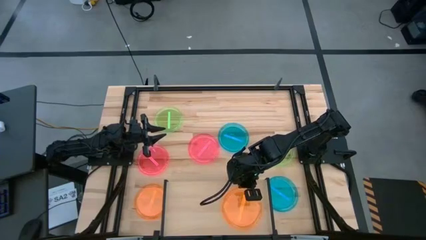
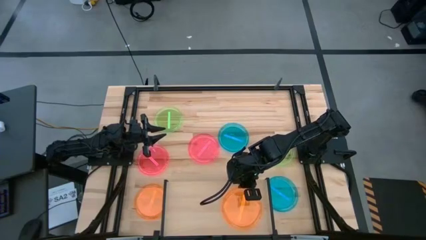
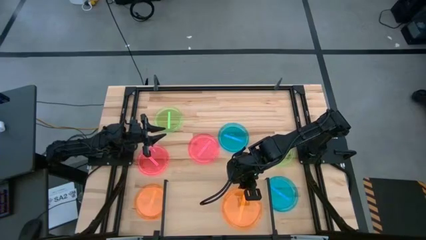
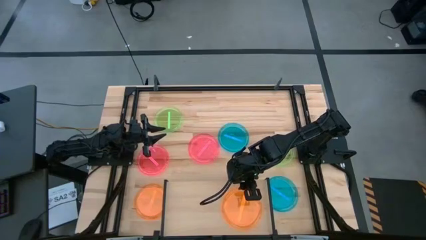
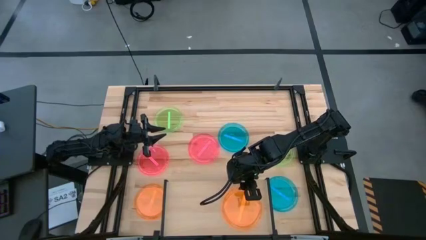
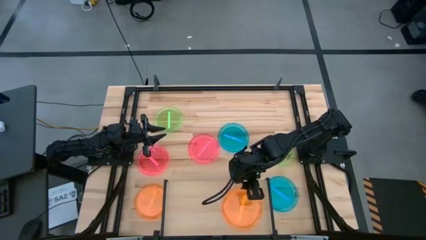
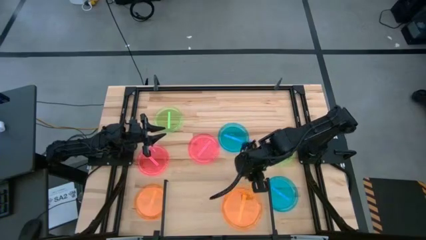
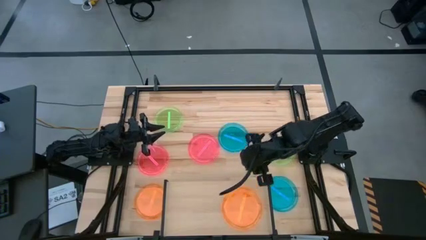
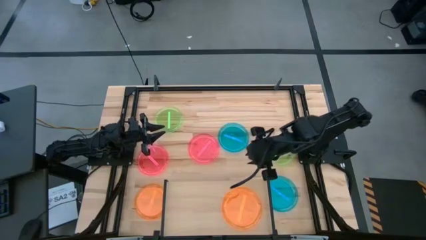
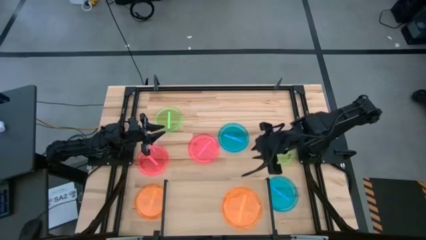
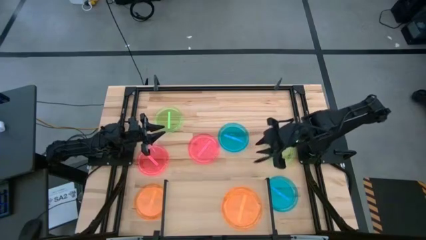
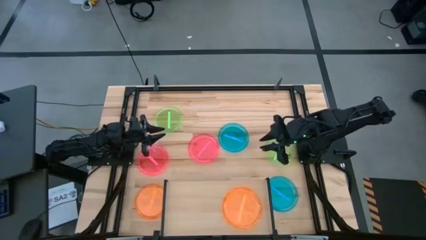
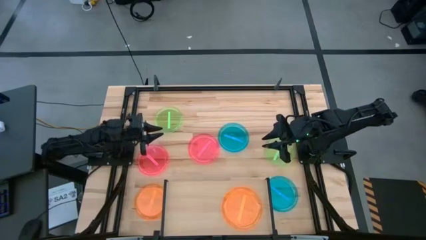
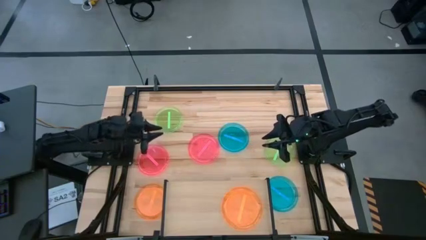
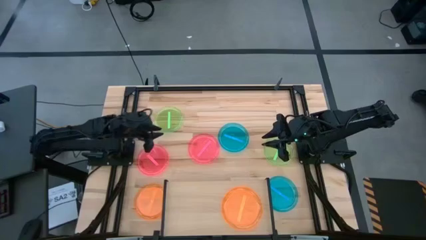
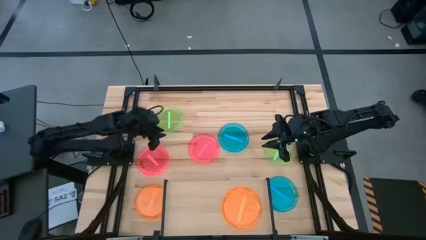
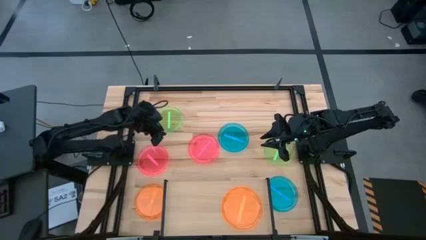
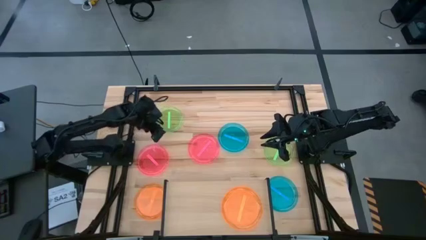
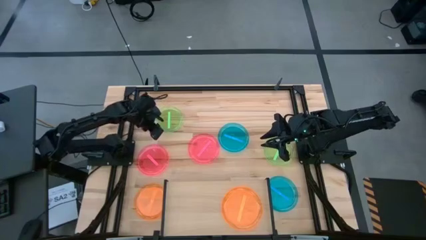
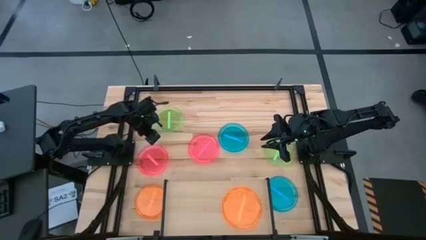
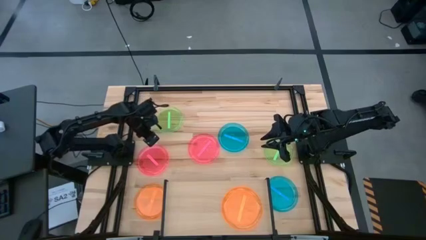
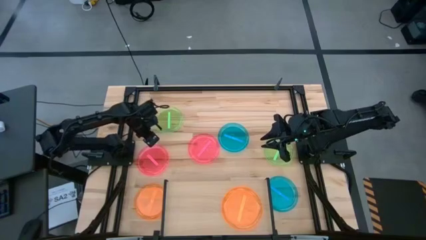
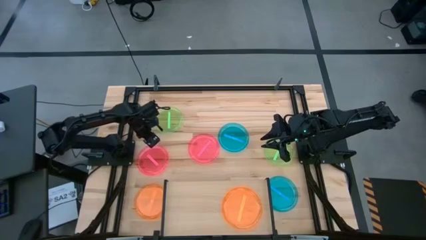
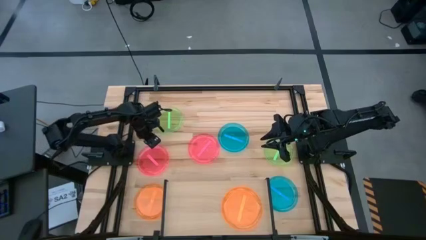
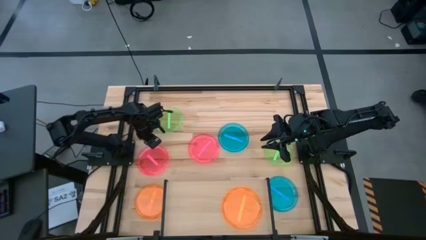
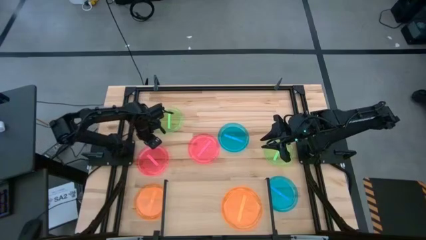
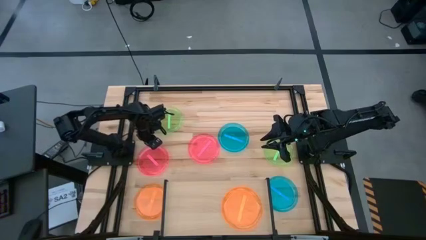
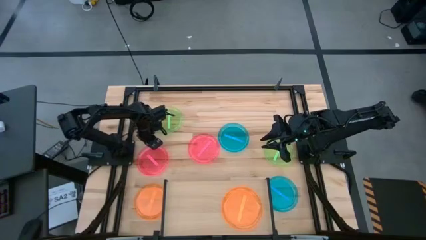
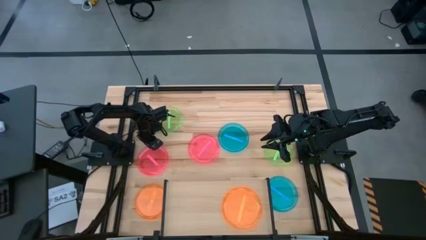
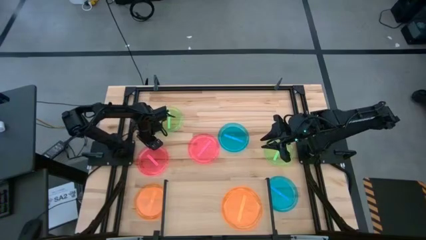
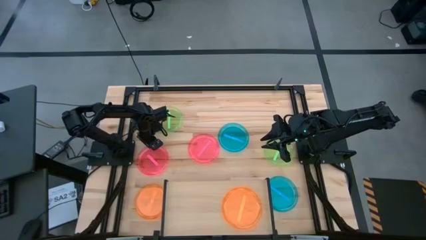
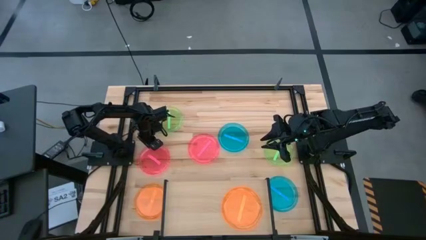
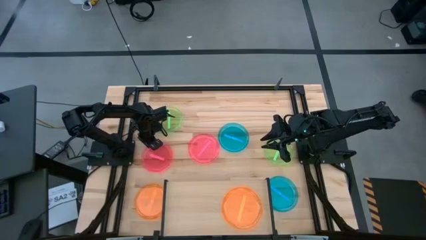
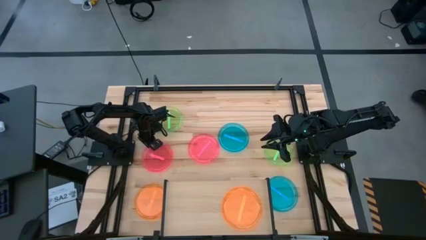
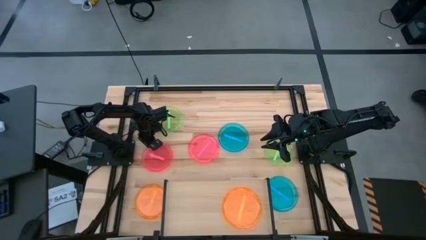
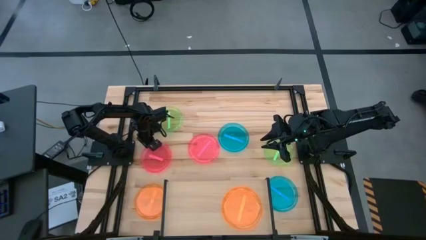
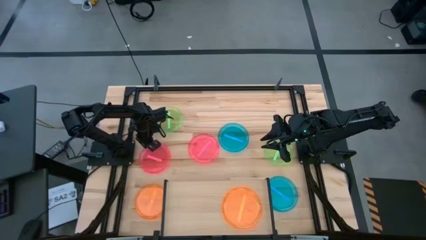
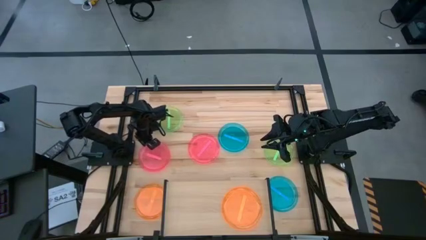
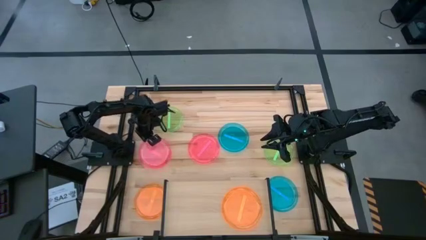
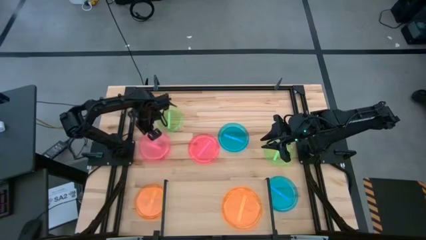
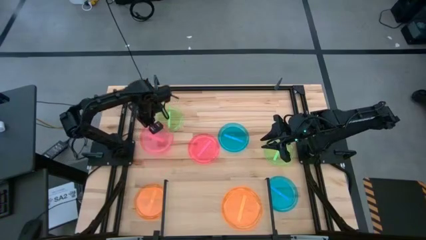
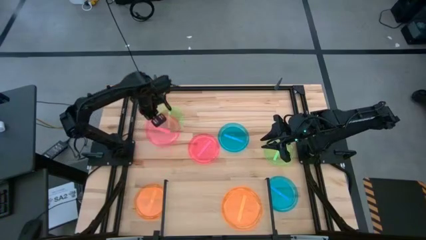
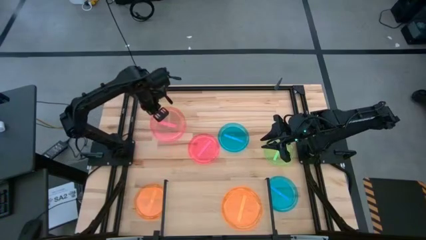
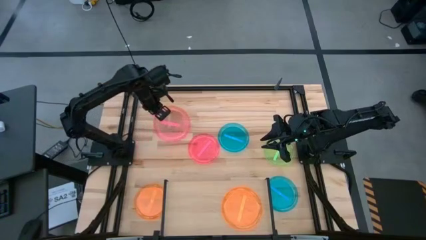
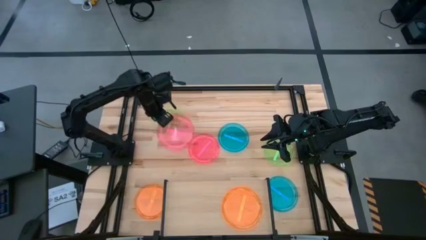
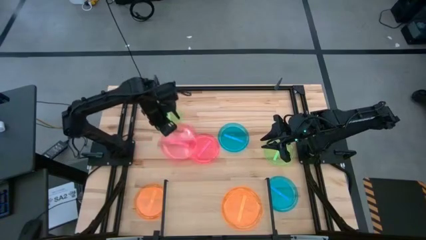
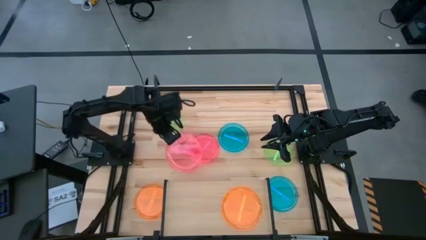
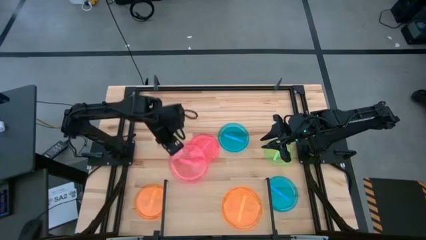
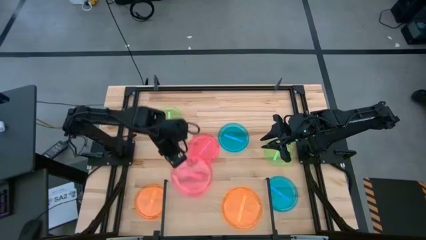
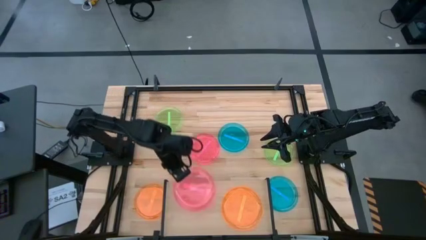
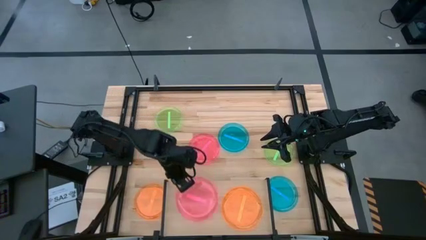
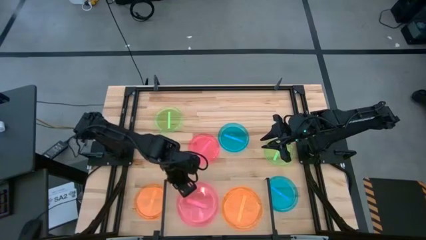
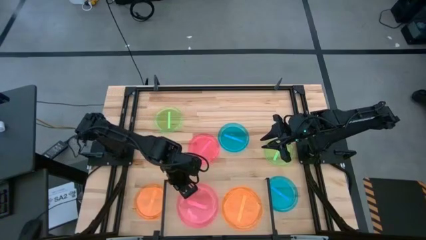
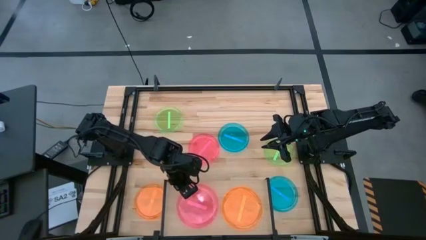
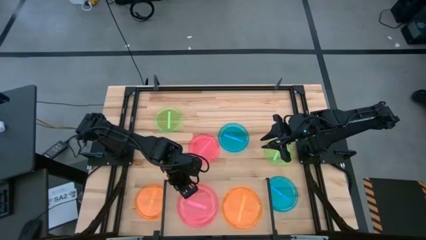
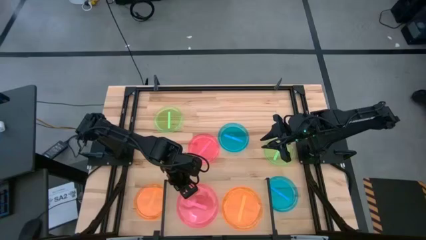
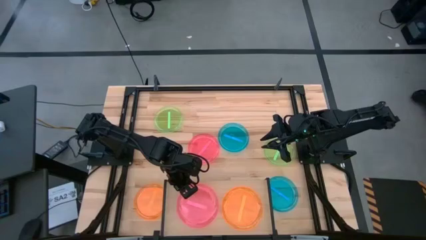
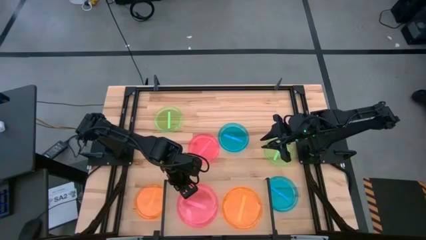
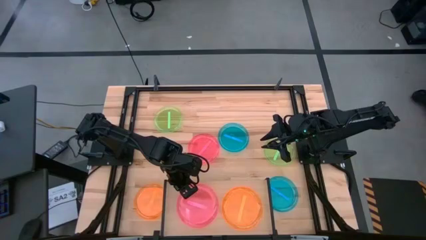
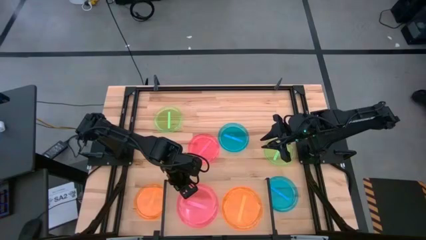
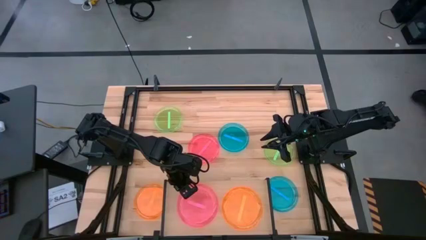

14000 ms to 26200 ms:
Task: Place and stack plates onto a shelf
Put the left pink plate on the shelf
